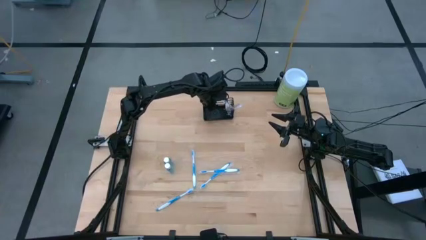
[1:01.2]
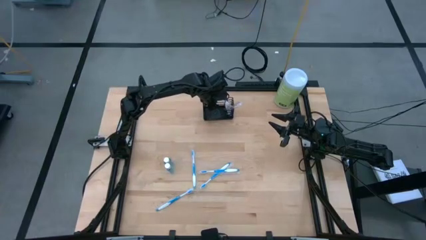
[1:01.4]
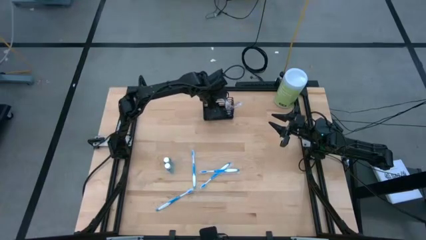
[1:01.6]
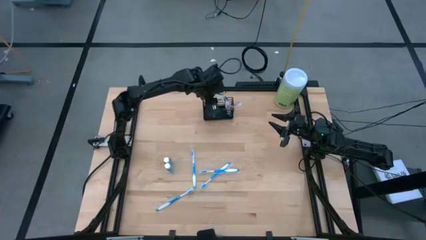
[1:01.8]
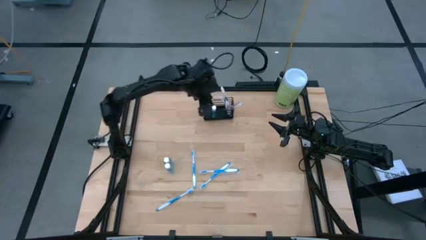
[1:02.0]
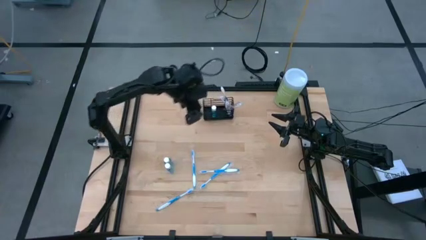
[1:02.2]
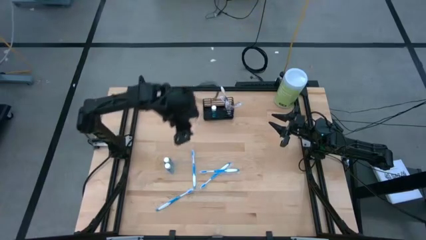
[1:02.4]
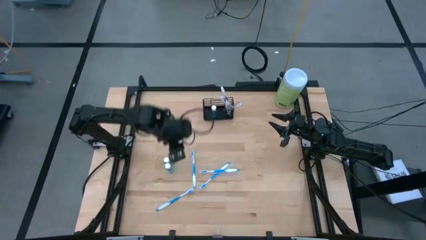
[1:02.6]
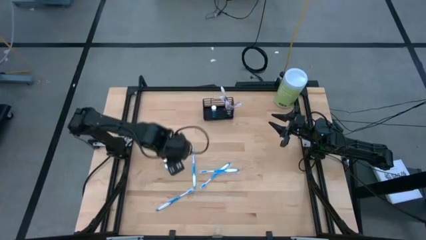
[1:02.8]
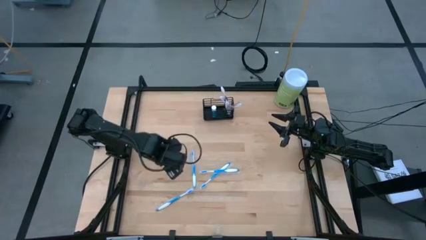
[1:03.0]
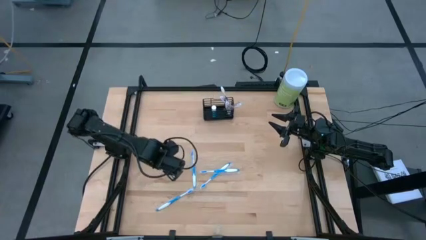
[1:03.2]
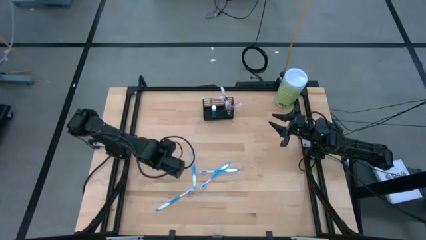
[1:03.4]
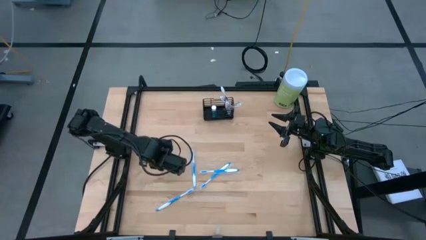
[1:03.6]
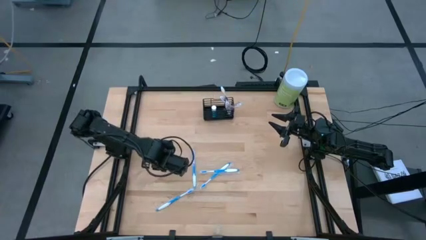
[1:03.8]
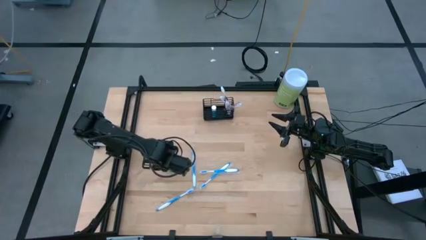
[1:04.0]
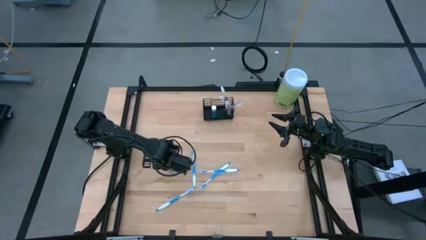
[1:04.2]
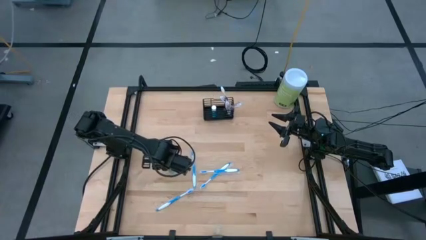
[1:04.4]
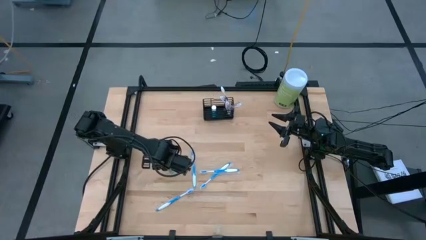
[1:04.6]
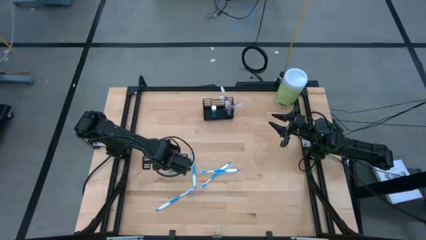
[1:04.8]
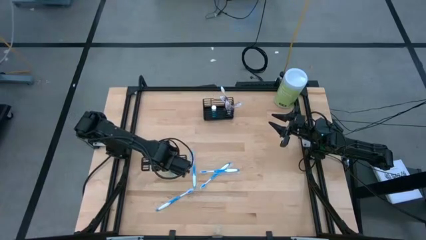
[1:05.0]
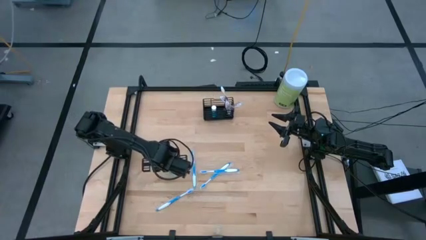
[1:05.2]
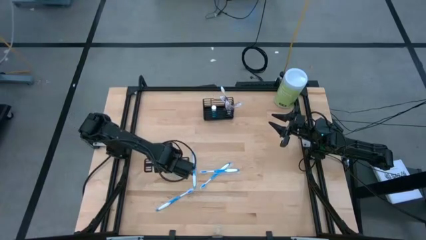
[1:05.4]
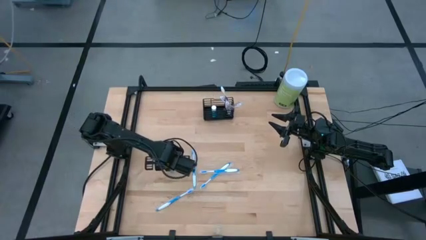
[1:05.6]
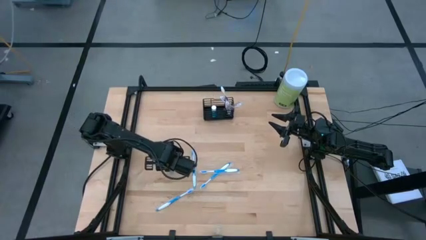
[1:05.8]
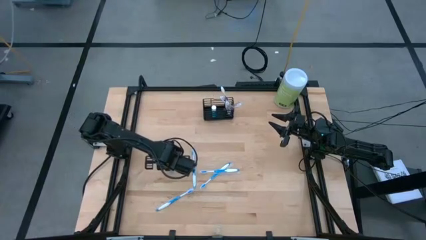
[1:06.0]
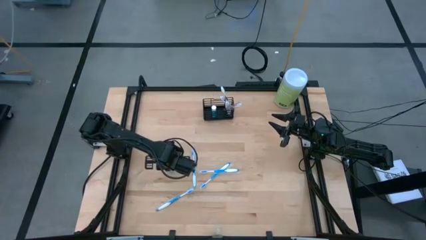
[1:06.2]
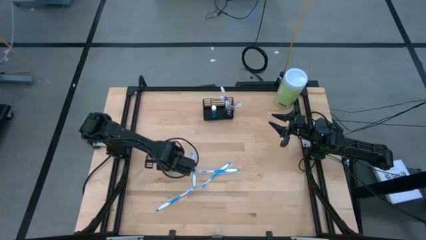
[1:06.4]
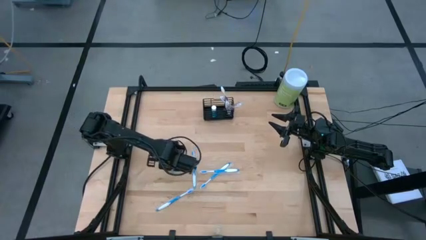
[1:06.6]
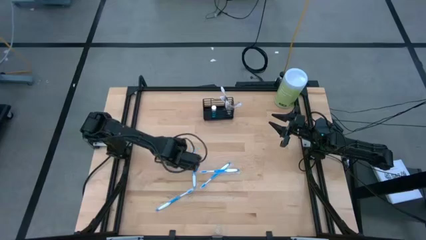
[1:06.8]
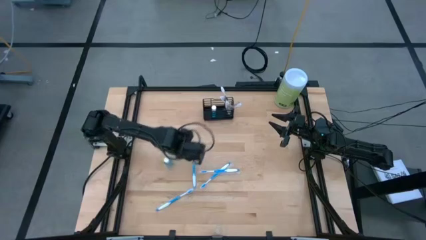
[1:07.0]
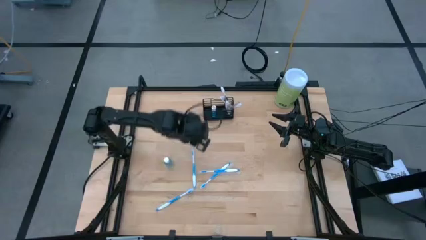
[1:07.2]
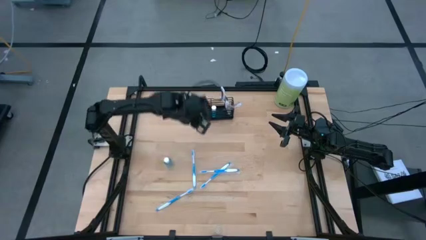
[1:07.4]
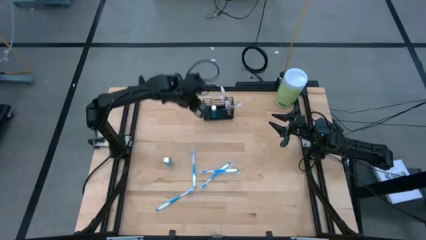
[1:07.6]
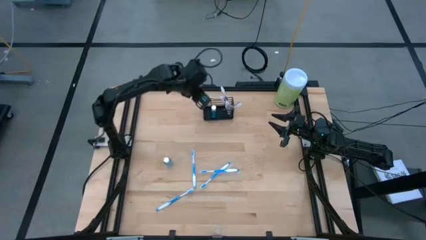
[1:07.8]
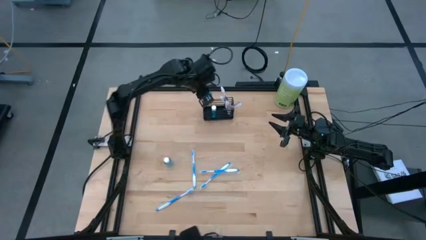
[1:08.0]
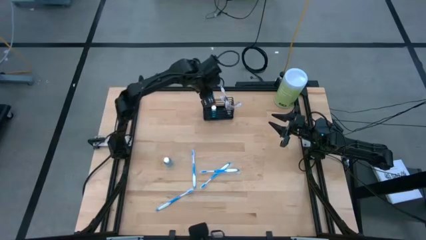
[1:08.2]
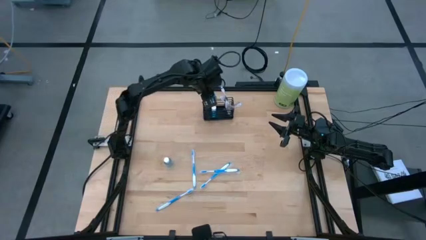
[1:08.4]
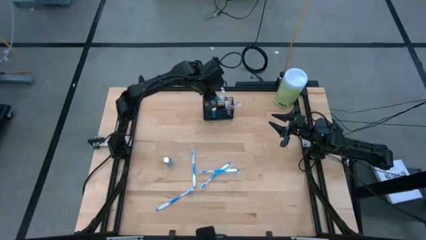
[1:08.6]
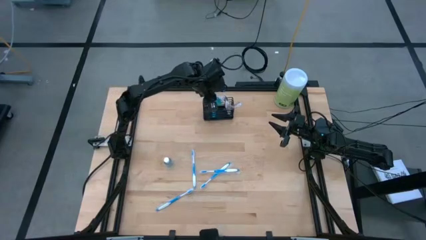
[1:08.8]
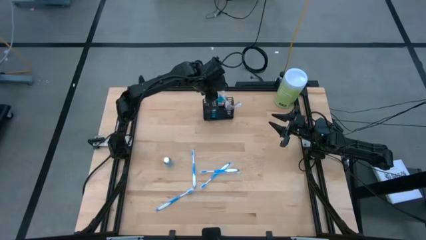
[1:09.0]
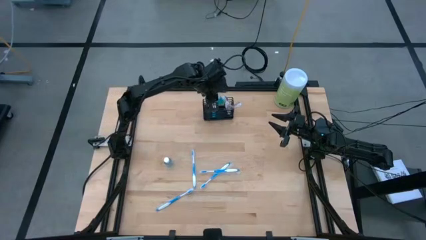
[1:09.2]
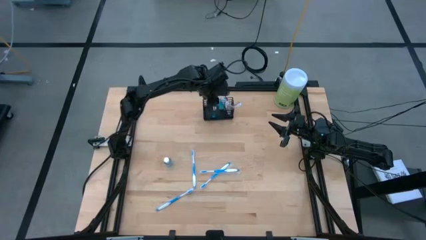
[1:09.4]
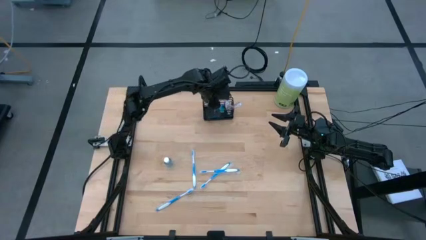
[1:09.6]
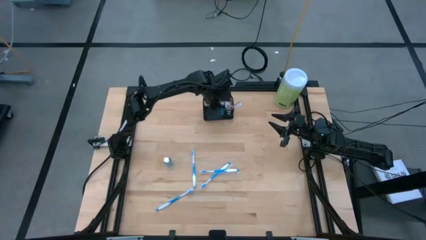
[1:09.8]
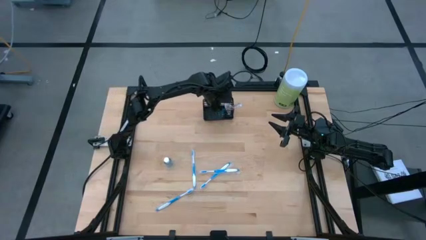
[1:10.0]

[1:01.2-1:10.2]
Task: Pick & Place toothbrushing station
Put the blue mouthwash into the middle compartment of the wire organizer

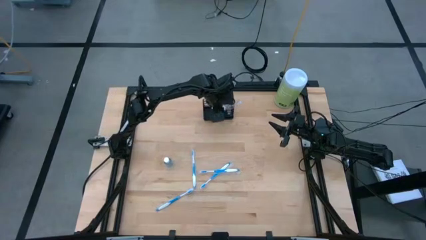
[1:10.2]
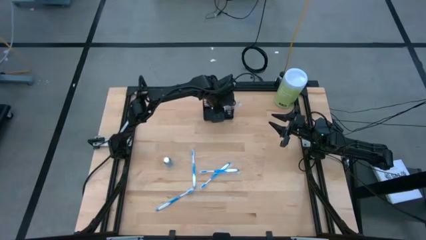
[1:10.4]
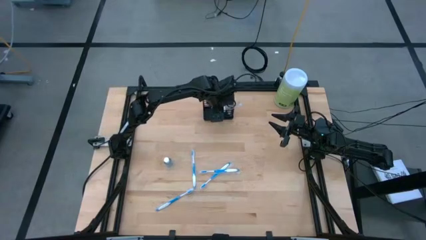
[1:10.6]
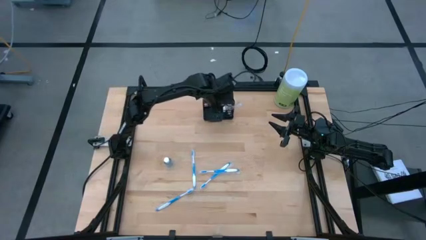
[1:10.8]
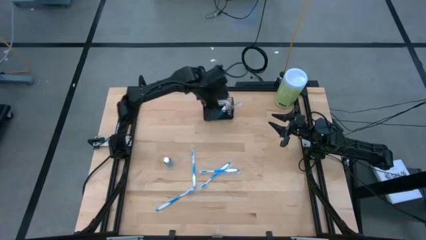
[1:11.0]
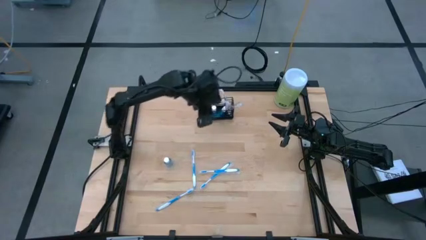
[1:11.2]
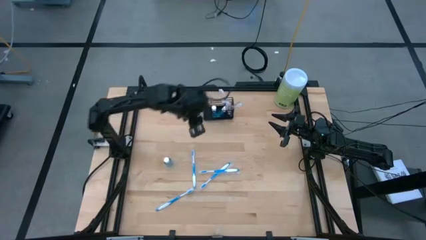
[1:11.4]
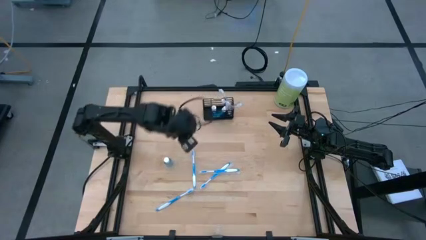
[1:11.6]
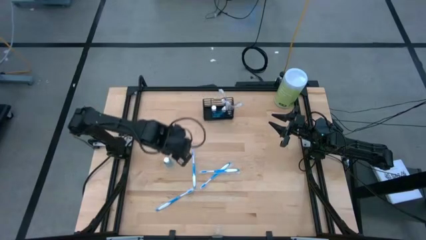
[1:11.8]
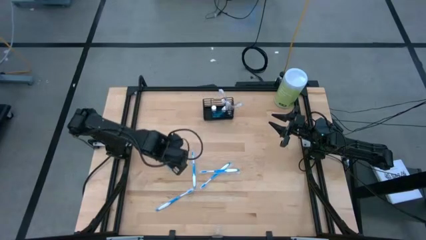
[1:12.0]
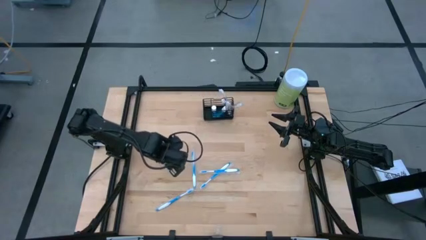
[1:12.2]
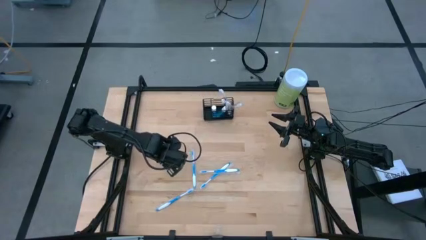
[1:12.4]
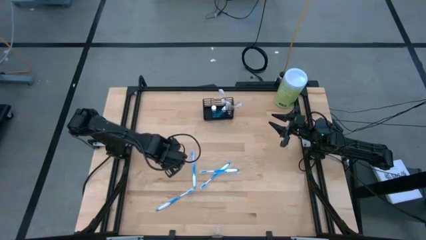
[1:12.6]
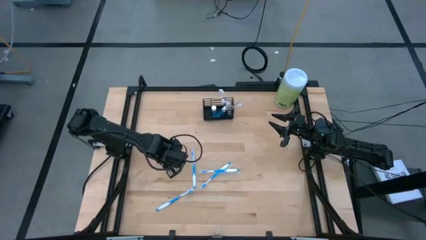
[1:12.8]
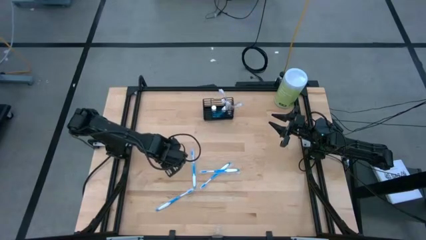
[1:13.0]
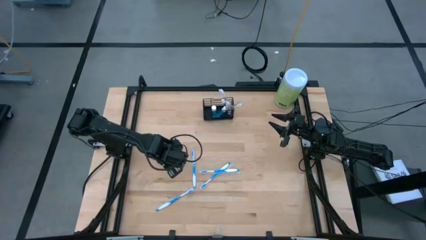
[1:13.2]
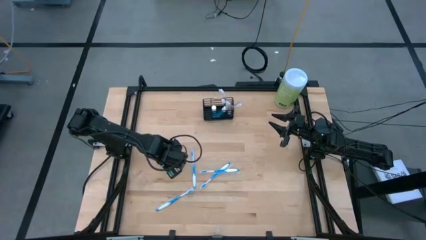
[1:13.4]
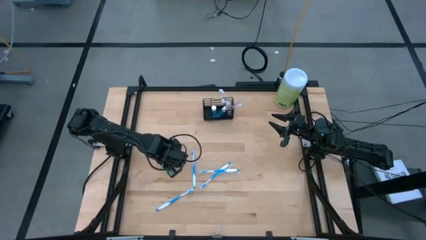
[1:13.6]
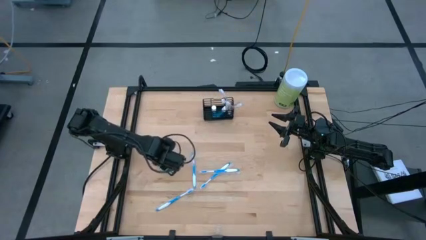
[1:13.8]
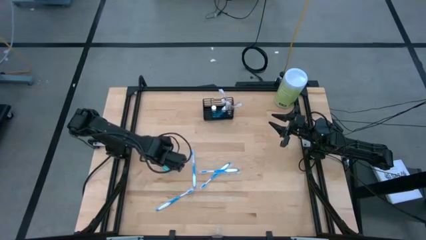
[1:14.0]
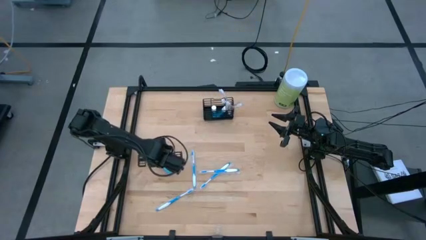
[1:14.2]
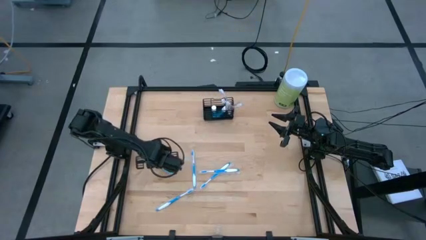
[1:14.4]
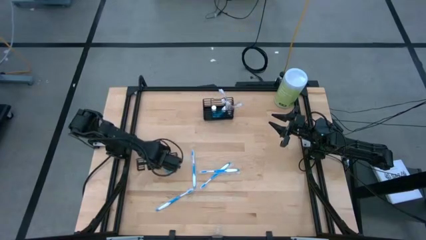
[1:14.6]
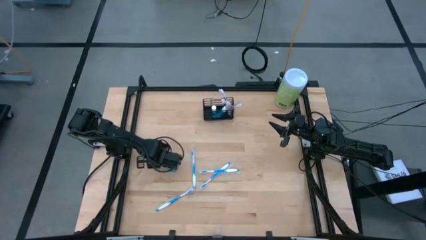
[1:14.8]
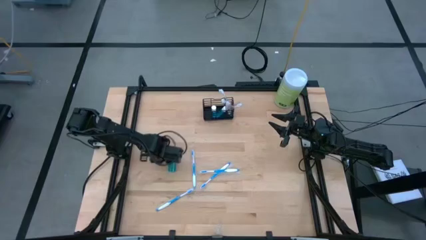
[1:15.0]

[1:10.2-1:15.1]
Put the blue mouthwash into the middle compartment of the wire organizer

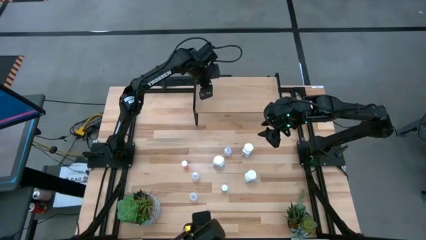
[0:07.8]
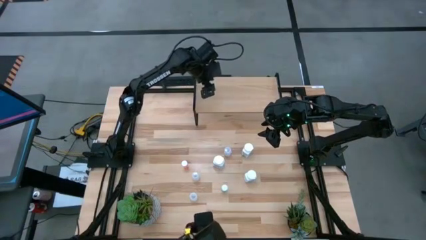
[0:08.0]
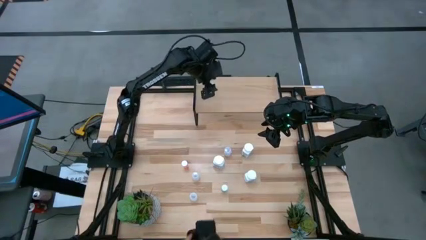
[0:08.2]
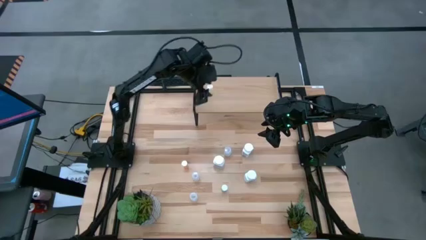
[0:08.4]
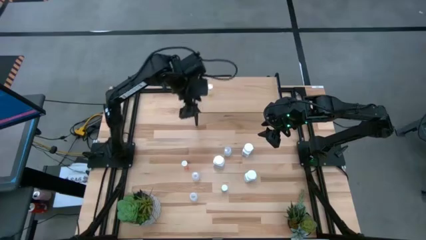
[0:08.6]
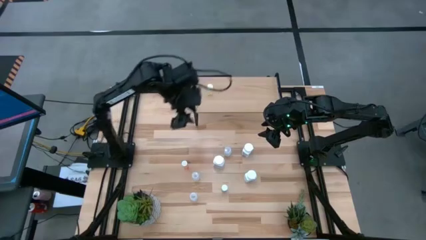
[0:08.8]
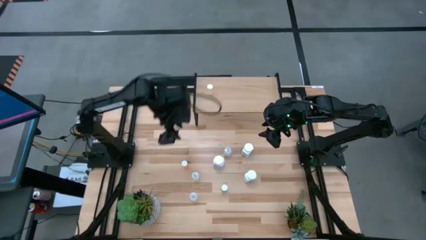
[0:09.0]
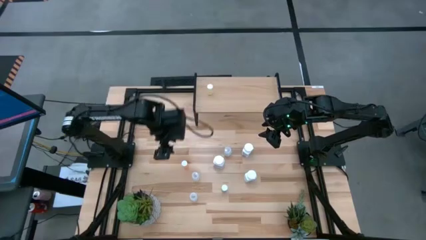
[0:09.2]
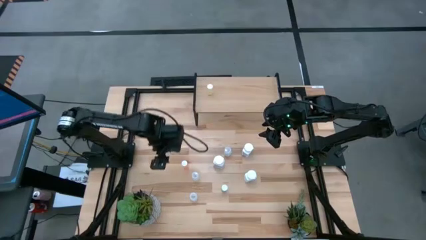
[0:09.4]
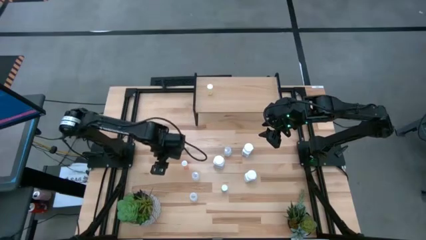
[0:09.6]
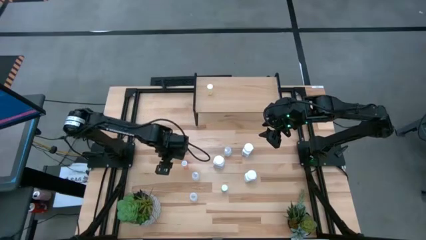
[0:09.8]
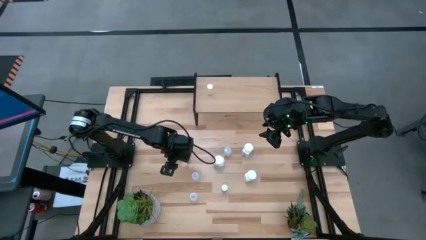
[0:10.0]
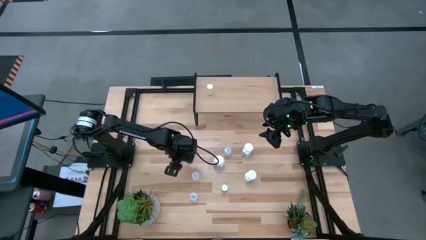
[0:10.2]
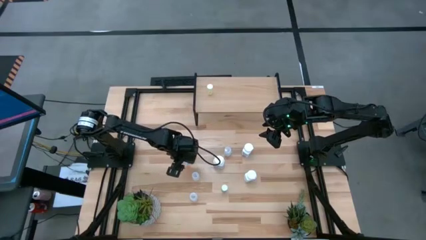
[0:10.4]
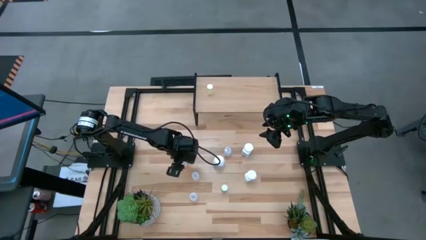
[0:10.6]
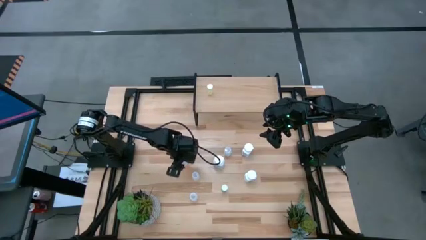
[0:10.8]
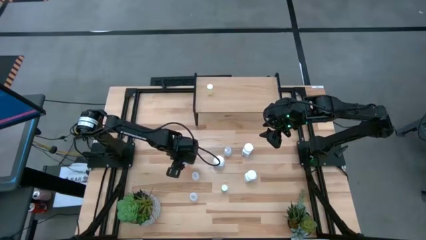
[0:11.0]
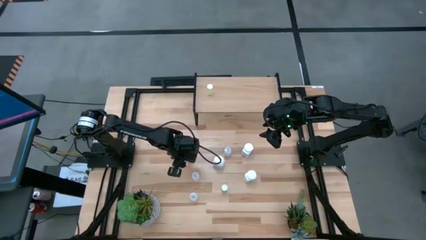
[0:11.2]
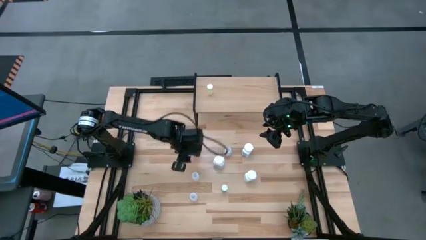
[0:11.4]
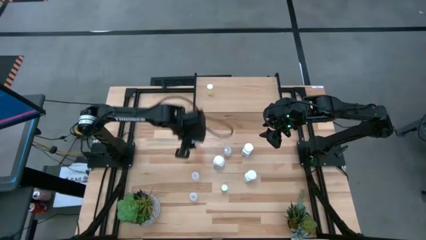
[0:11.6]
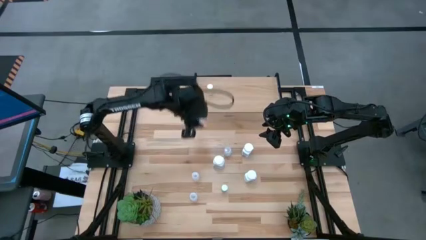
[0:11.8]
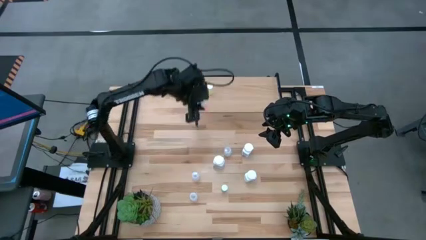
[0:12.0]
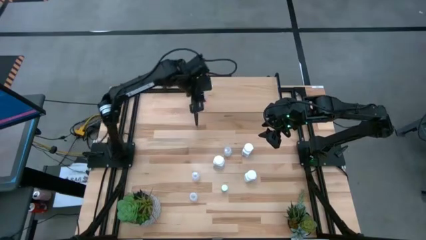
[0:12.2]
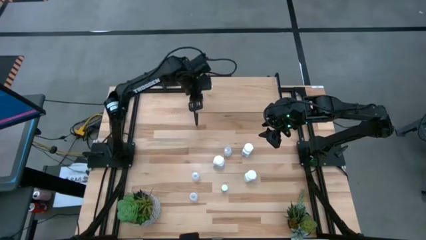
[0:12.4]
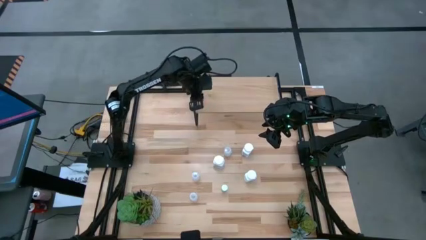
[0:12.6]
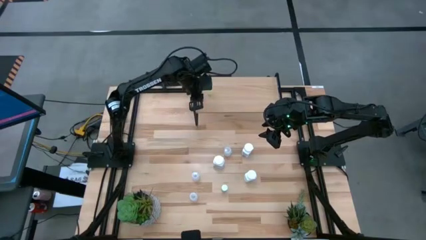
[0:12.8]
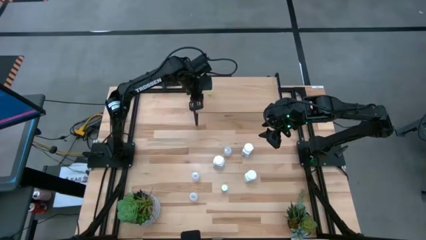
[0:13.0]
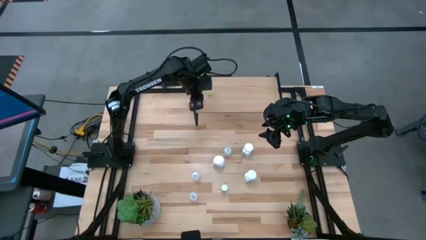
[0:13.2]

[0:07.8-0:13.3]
Task: Pick and place medicine bottles onto shelf by color
Put the orange pill bottle on the shelf
